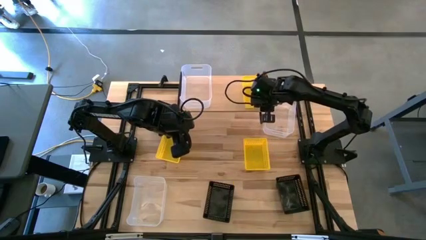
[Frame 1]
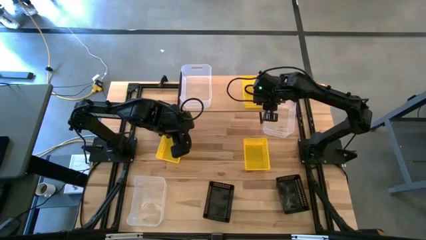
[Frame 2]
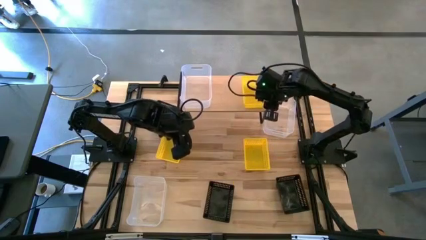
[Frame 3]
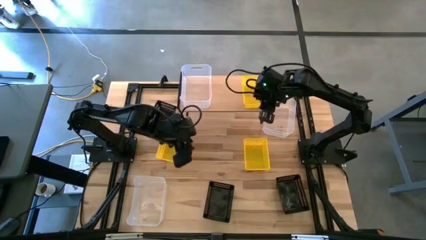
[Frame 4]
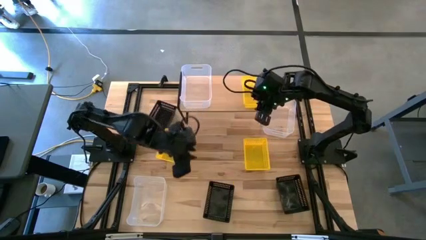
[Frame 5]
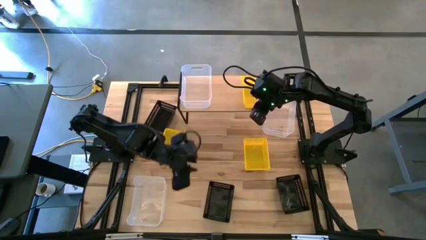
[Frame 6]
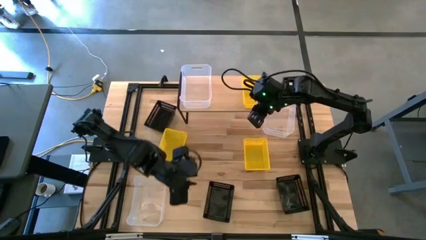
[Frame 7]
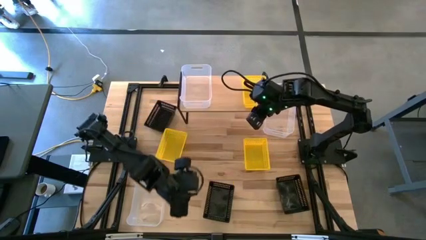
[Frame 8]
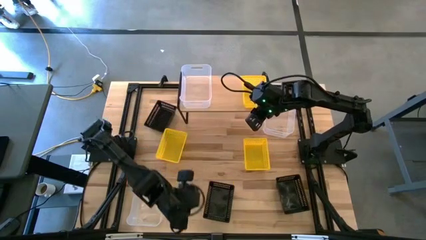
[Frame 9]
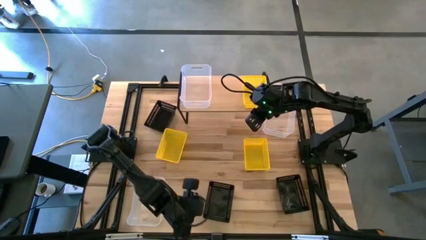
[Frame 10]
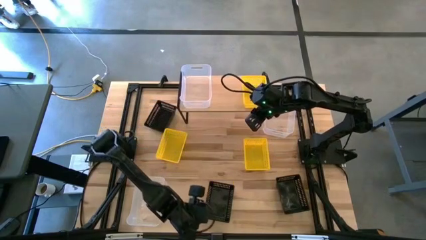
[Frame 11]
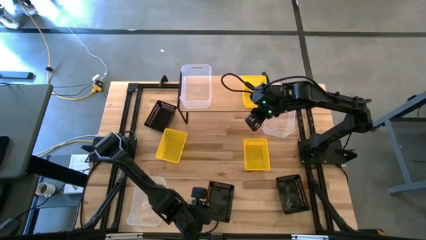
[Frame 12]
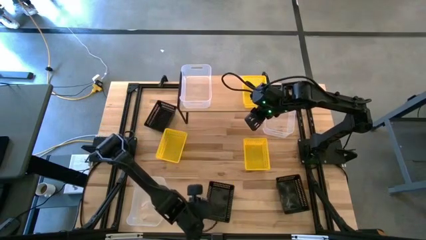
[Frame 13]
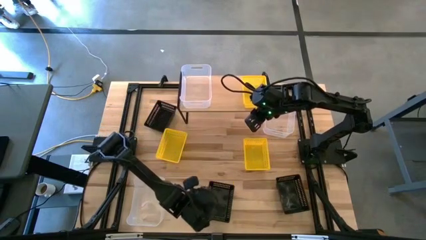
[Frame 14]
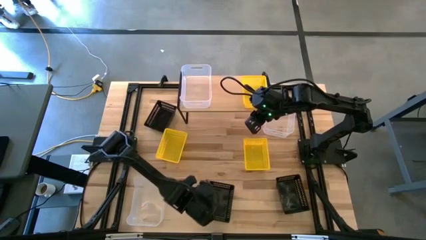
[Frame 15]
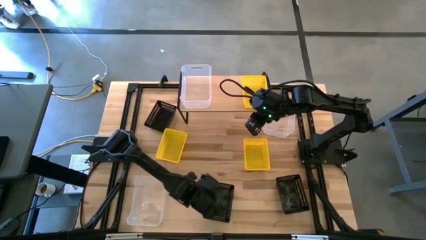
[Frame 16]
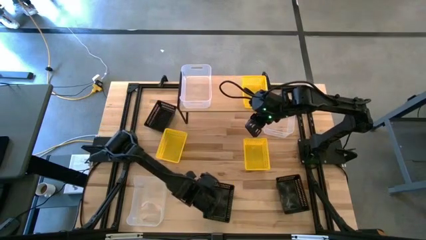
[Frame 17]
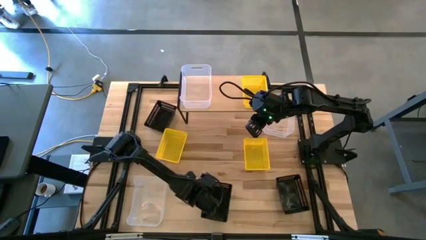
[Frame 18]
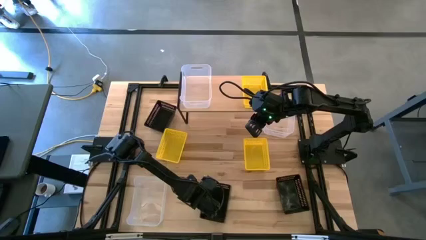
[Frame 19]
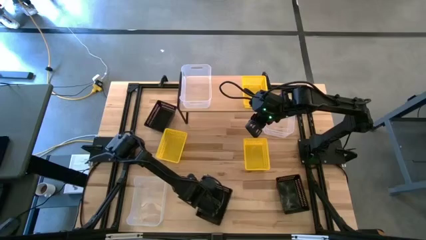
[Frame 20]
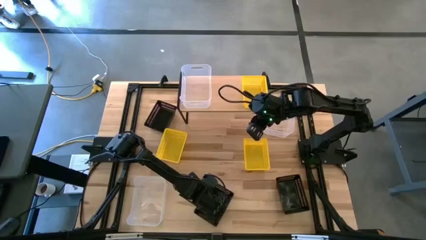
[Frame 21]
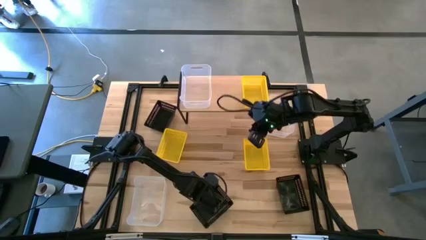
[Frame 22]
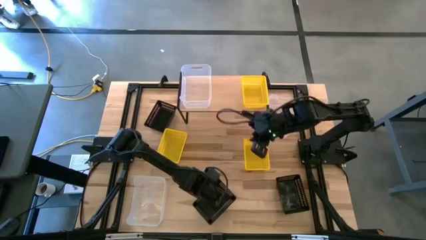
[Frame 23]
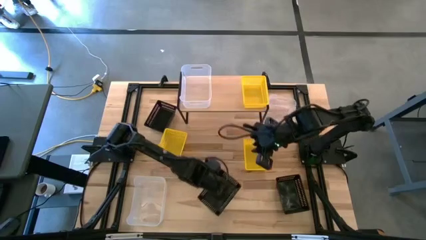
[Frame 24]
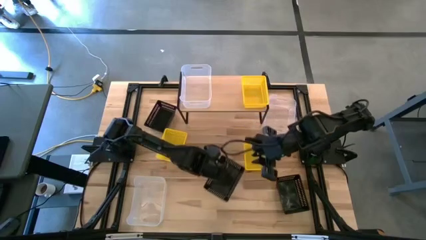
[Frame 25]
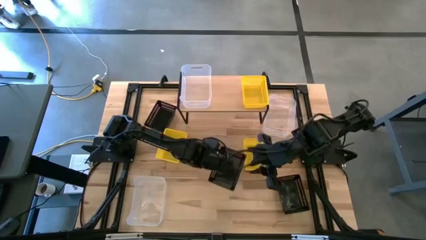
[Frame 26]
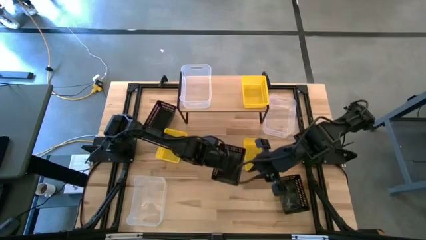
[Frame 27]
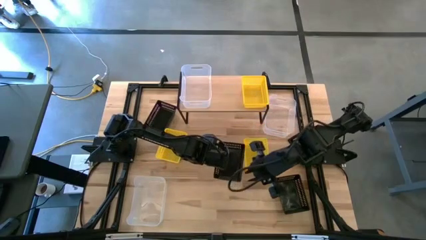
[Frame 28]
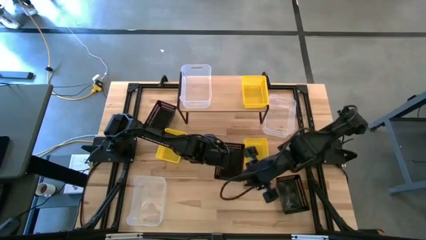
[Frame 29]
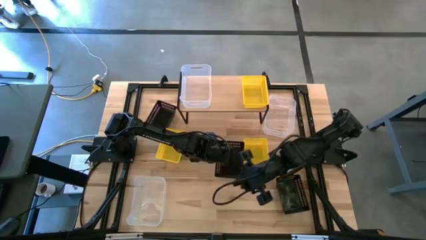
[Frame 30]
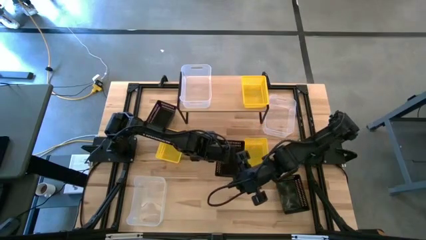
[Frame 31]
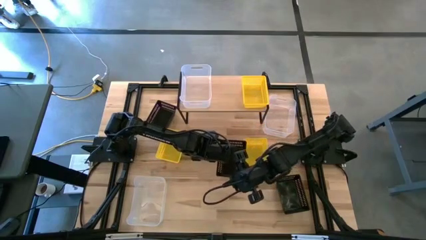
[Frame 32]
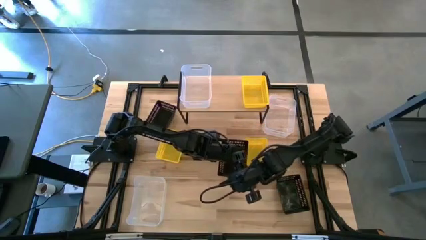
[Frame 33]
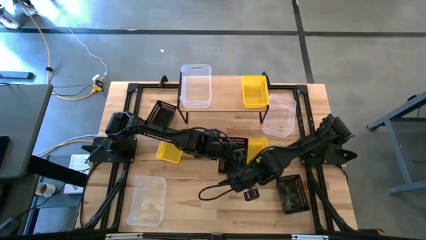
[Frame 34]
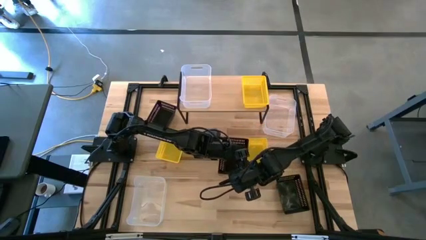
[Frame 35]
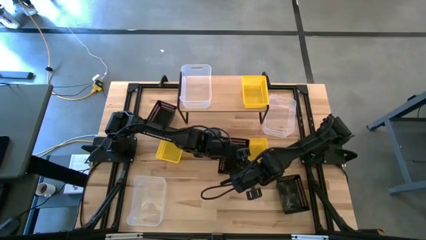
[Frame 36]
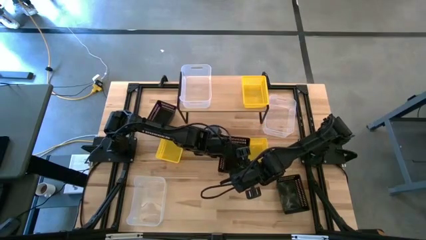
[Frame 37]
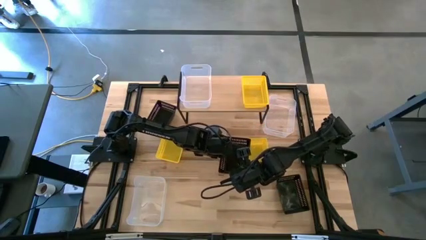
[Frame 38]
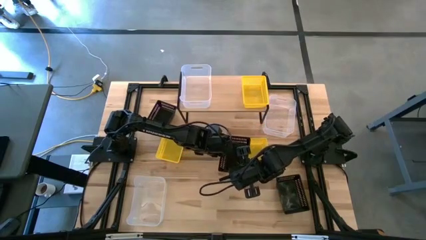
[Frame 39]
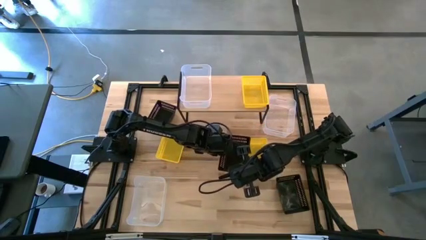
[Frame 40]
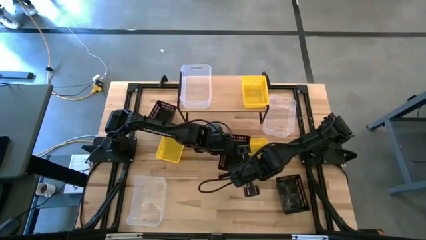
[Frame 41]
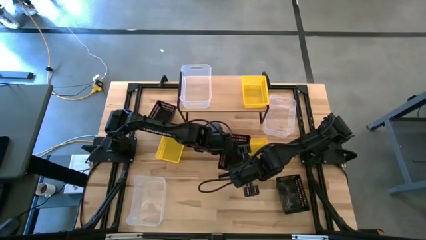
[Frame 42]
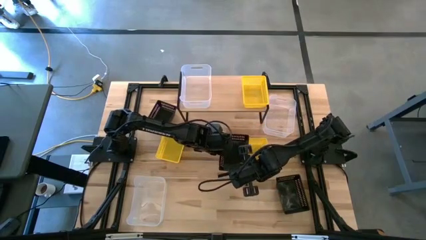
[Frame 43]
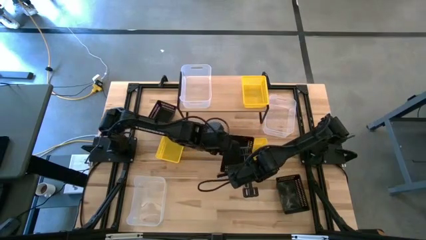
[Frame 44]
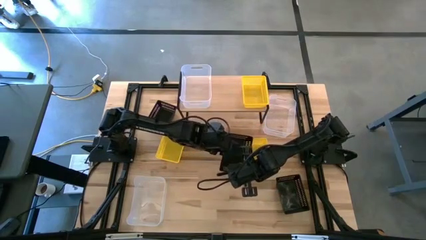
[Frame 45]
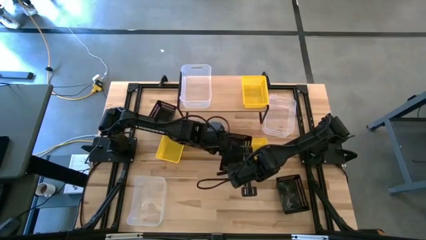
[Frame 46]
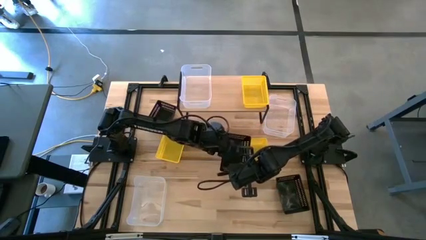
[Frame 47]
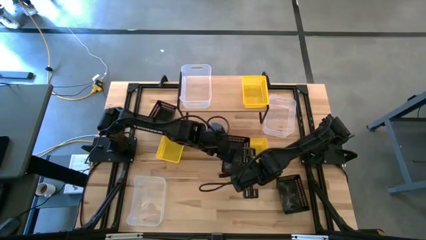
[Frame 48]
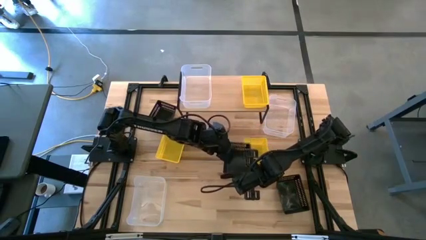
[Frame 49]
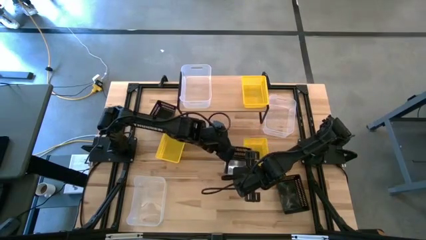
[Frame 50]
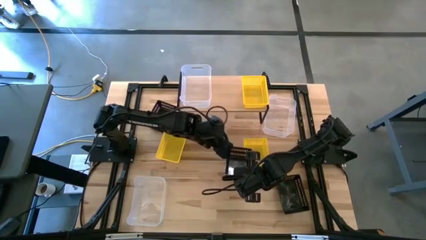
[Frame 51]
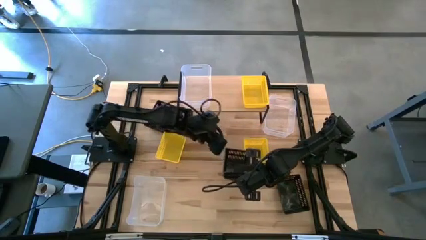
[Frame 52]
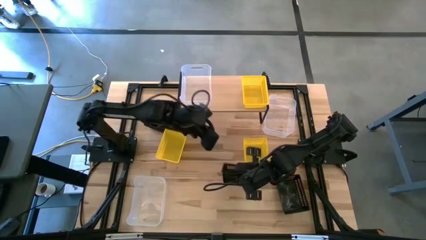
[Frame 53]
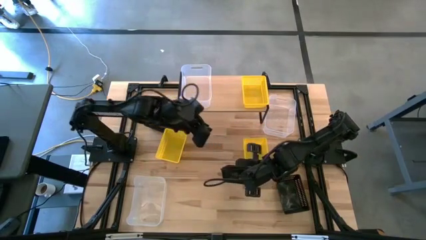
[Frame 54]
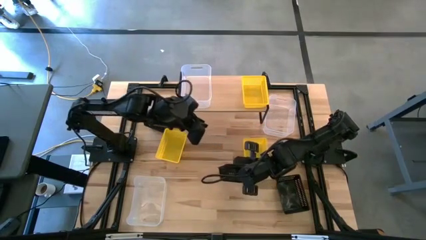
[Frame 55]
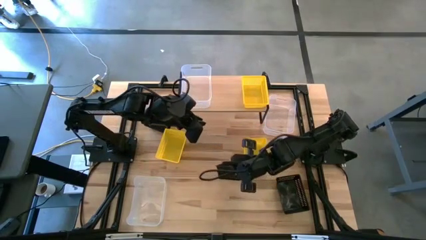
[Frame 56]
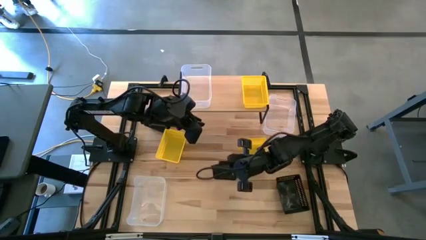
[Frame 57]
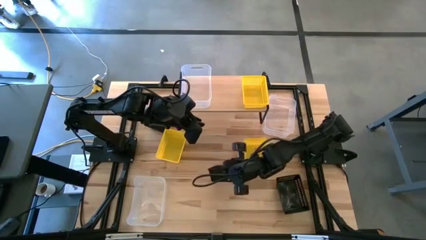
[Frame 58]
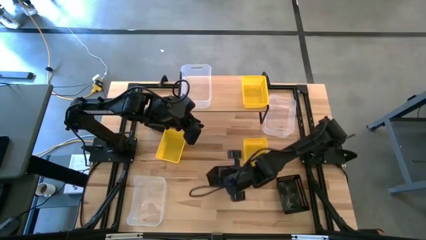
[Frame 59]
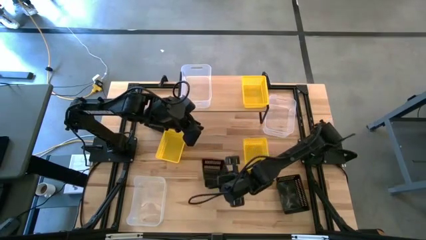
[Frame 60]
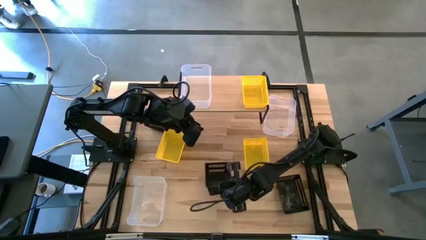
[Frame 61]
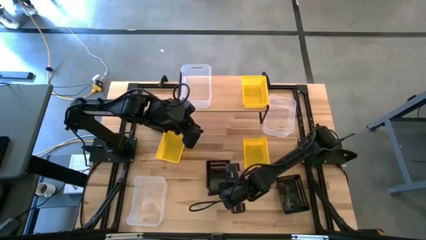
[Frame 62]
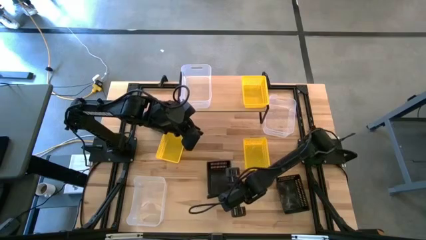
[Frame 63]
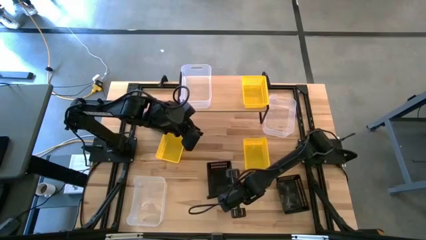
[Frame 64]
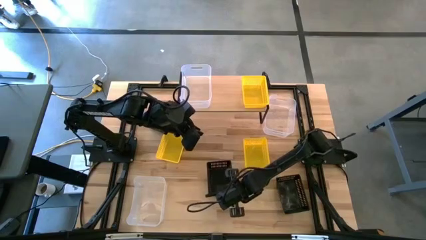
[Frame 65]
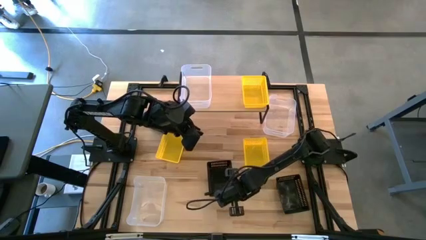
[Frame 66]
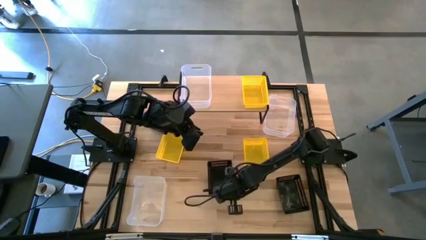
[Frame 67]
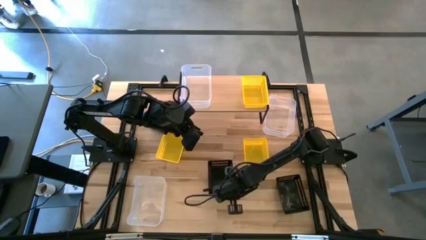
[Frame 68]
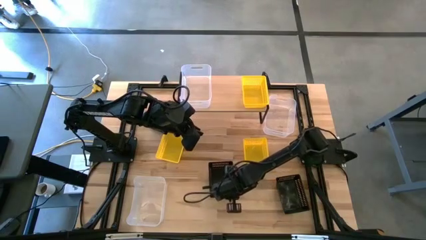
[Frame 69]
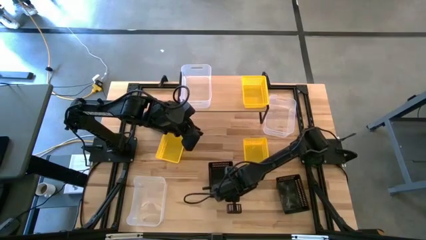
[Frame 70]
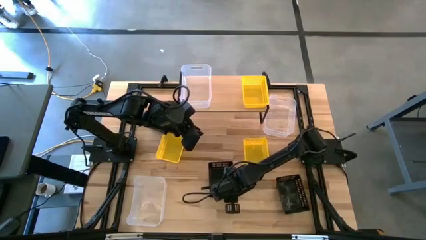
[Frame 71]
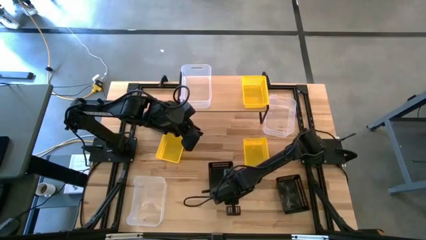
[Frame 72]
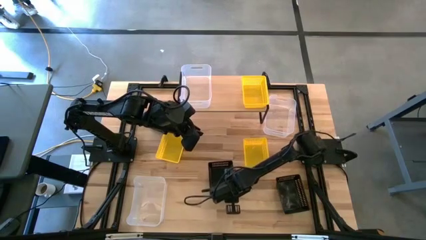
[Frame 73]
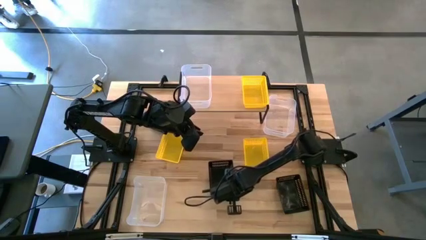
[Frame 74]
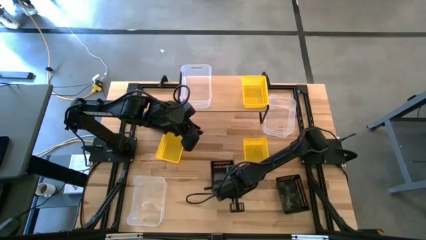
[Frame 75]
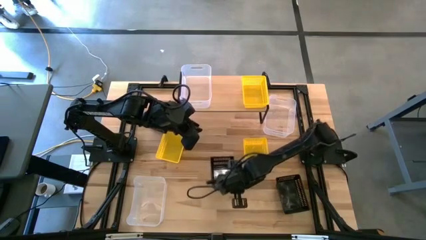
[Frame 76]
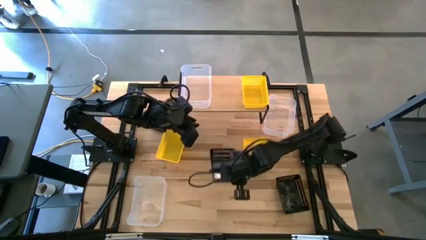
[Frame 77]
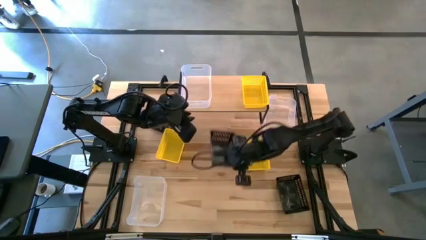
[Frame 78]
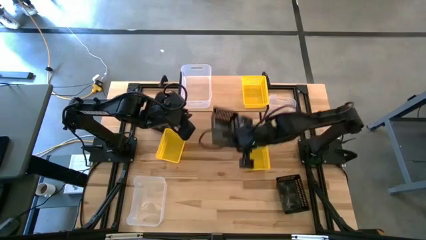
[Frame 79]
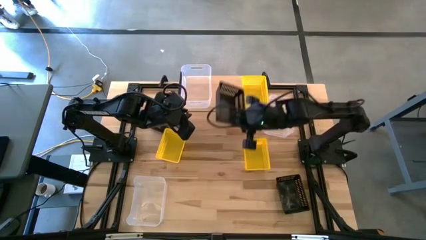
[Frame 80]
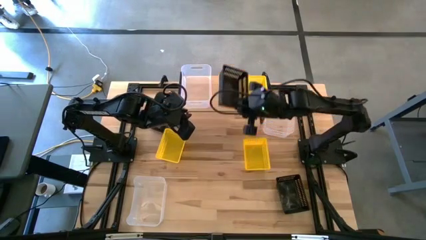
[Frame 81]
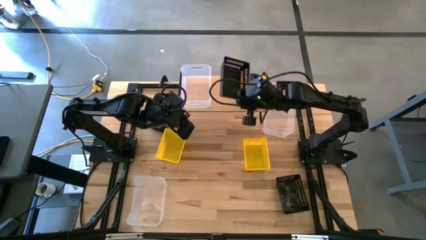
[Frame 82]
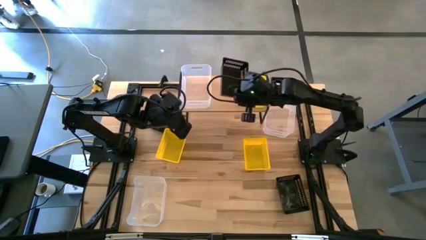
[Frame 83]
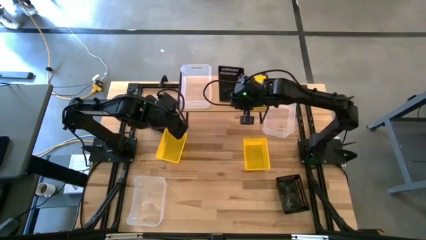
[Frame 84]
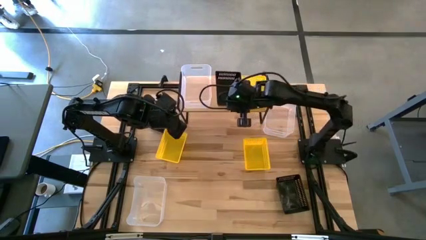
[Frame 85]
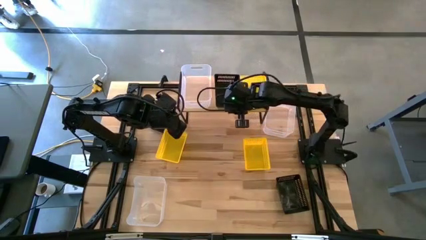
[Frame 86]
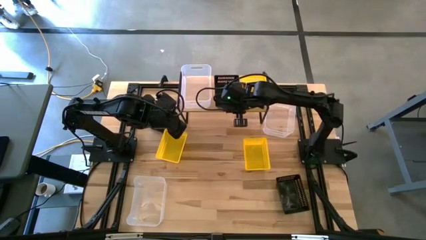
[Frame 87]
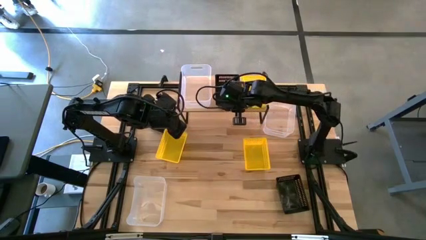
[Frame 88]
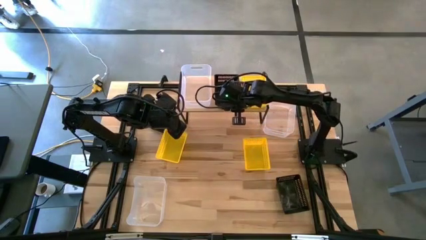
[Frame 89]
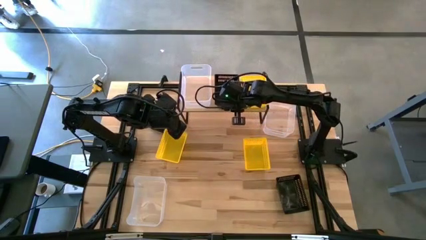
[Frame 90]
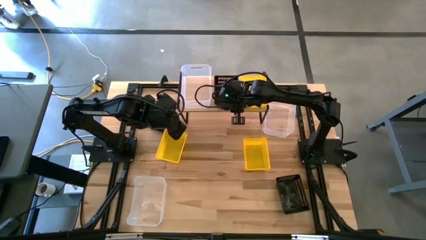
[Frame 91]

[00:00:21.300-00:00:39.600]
Task: Stack baskets on shelf by color
Put the bottom left black bin on the shelf
